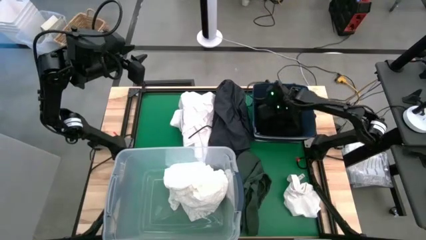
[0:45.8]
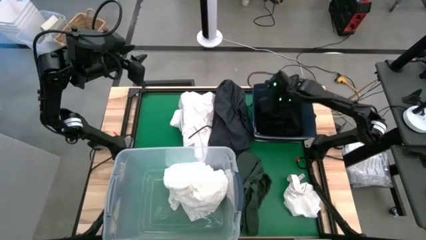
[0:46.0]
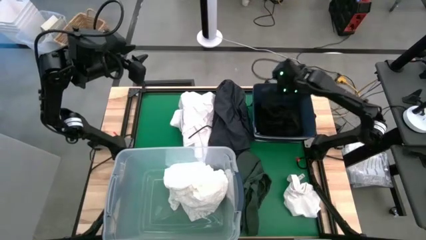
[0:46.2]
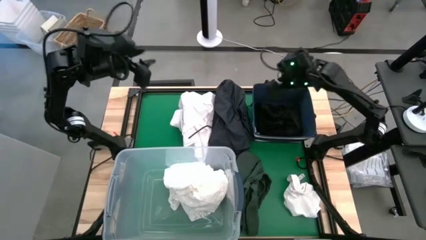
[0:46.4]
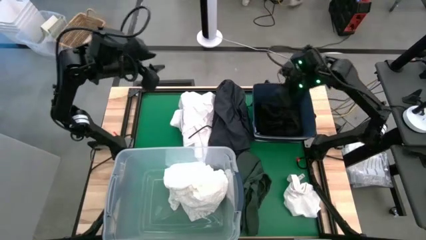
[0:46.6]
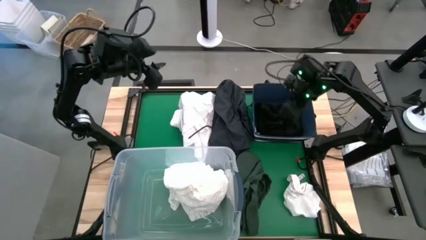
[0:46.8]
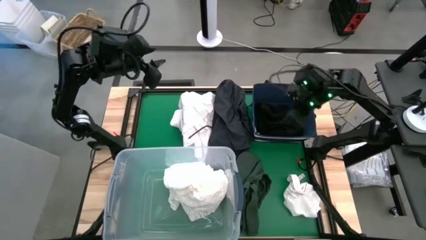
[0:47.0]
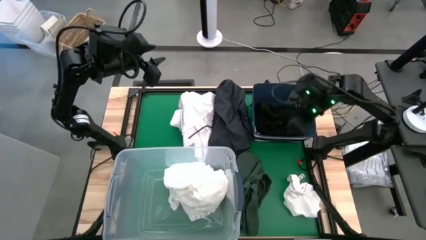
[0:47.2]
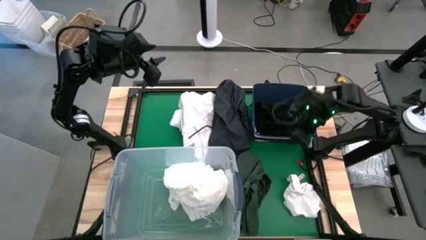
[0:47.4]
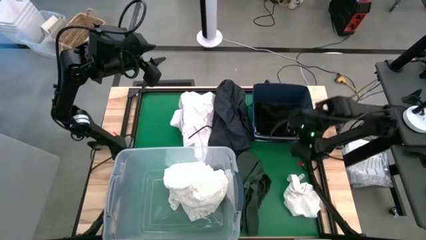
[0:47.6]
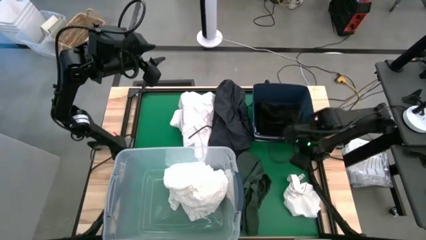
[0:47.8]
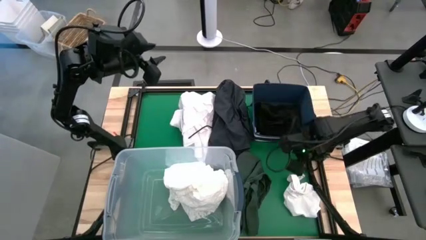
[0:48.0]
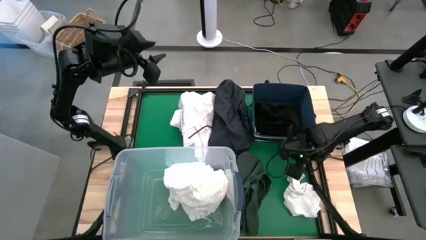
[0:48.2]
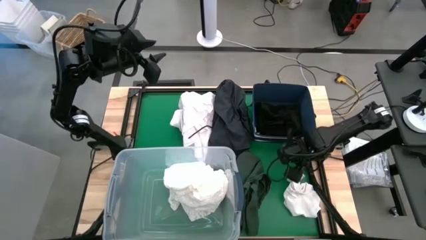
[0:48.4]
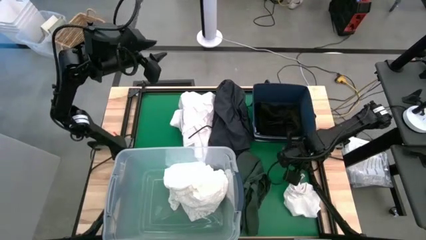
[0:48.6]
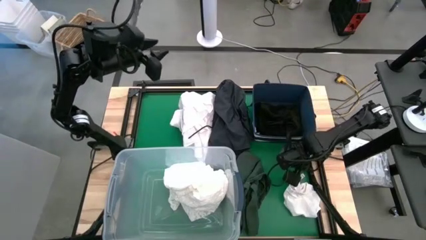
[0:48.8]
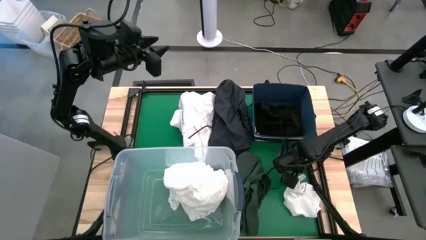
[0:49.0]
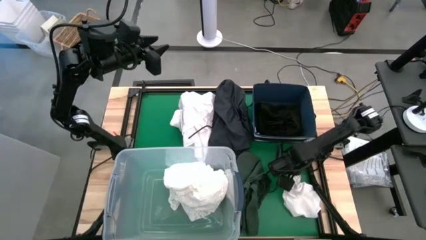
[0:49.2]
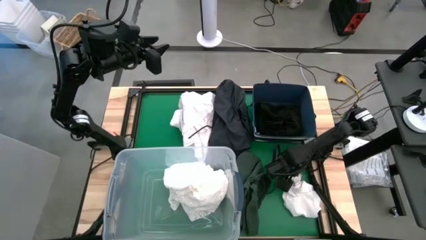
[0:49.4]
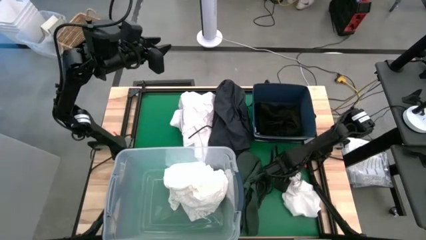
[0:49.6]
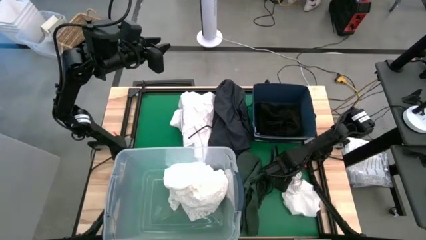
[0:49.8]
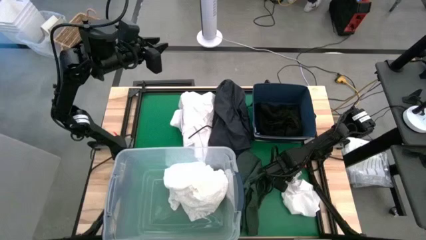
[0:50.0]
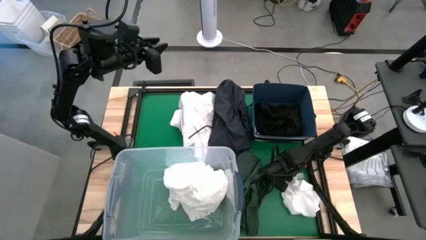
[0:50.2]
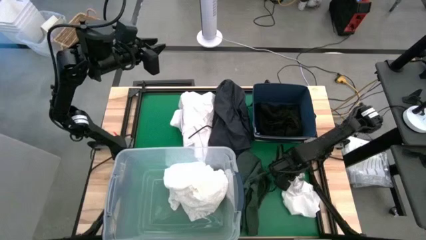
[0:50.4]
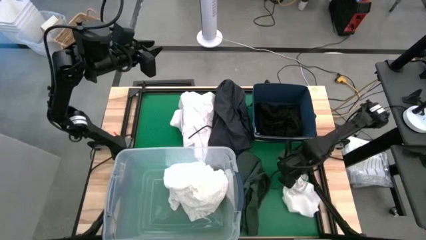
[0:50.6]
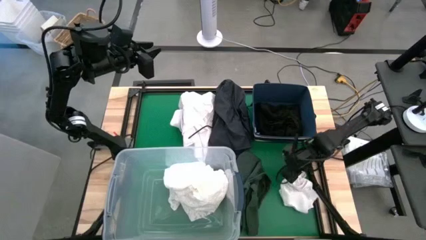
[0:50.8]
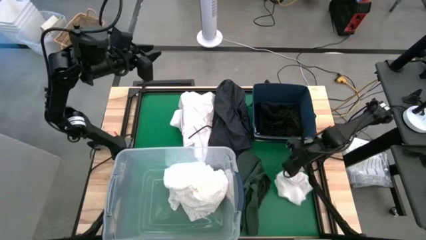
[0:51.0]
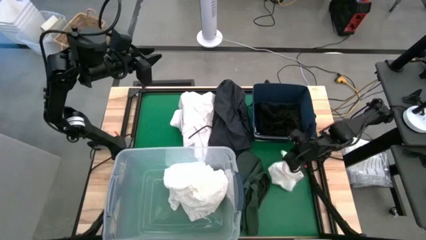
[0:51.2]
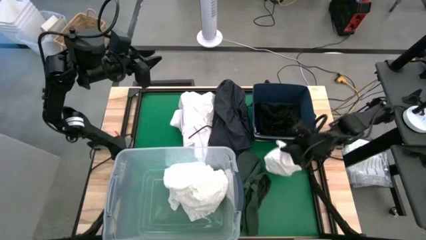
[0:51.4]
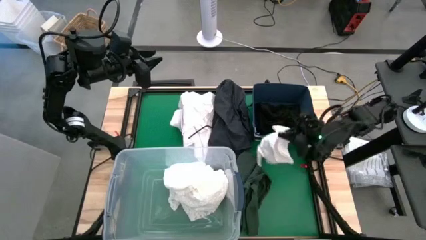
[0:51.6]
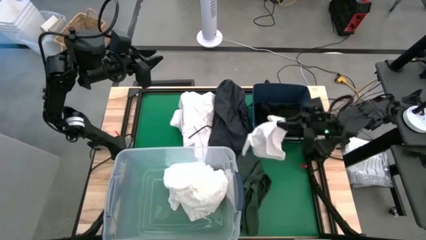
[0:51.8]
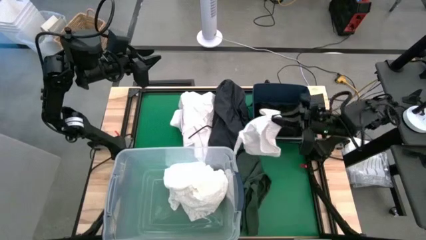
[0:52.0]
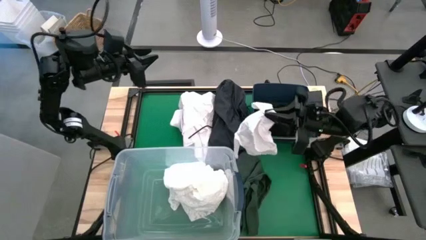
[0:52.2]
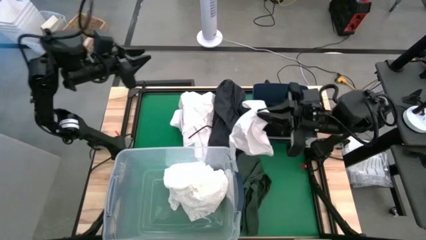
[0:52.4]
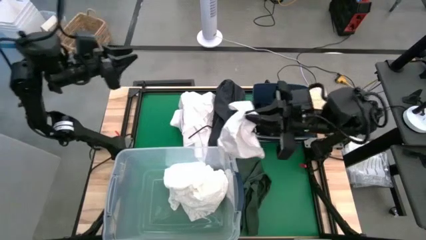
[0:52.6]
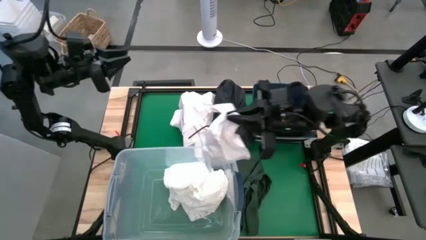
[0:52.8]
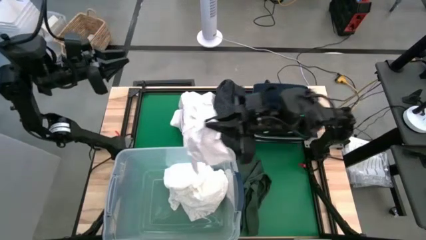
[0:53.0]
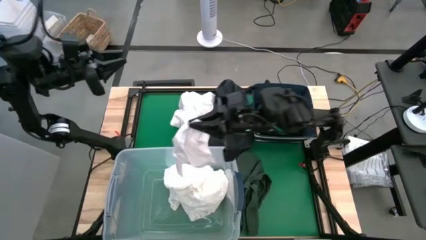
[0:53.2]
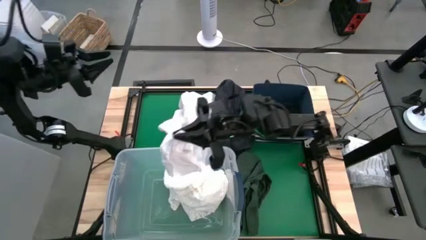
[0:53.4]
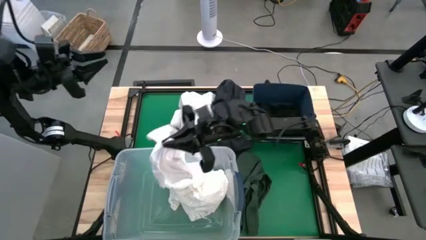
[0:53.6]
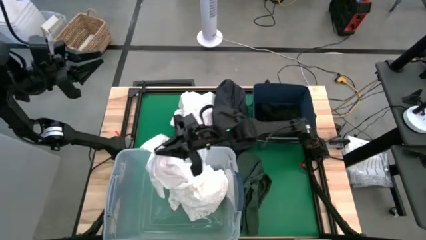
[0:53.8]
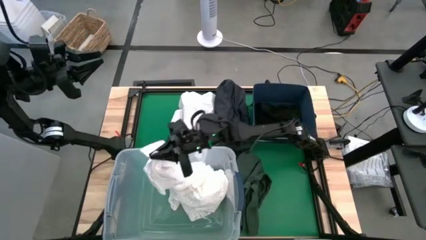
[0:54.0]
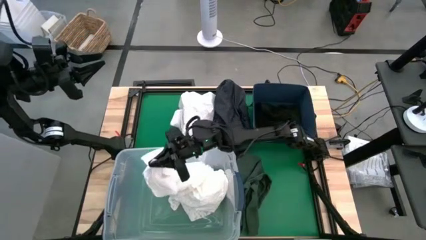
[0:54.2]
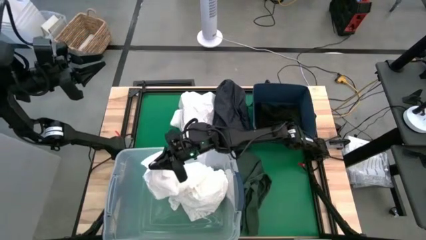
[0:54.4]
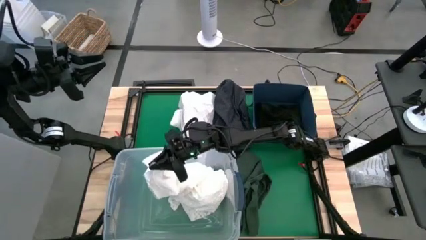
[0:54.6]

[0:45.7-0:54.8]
Put the white short pants into the transparent bin
